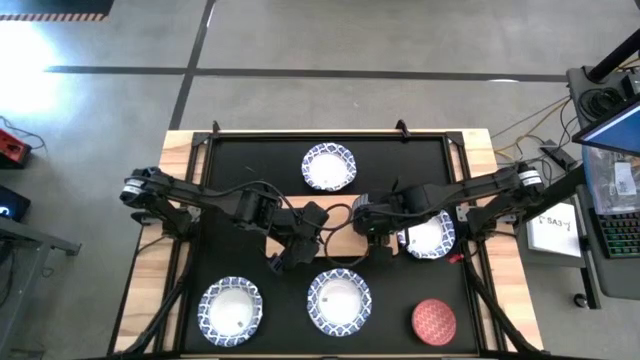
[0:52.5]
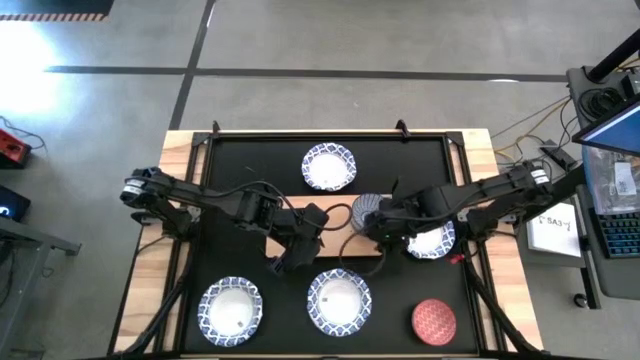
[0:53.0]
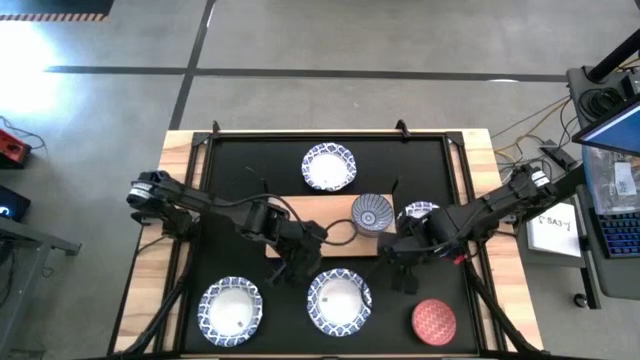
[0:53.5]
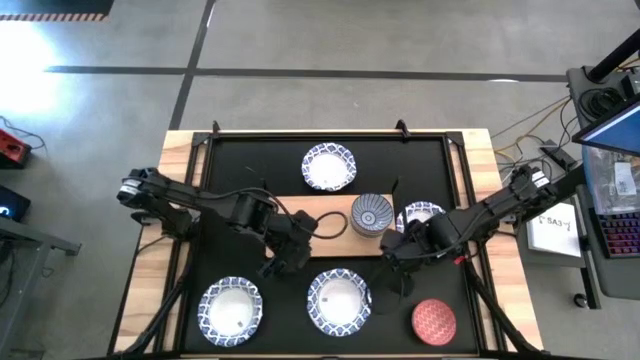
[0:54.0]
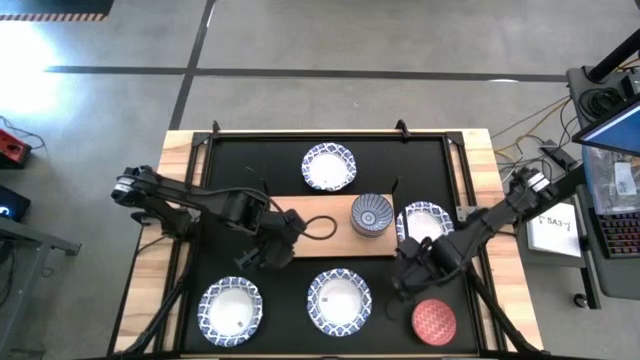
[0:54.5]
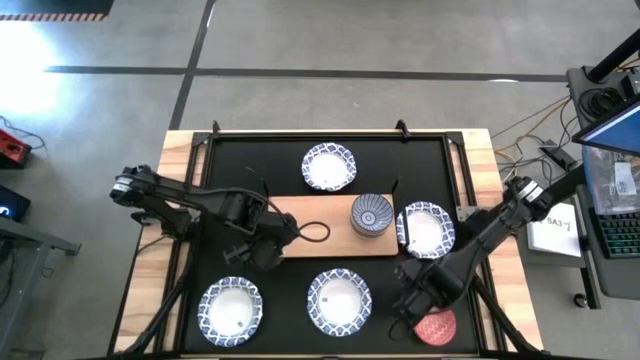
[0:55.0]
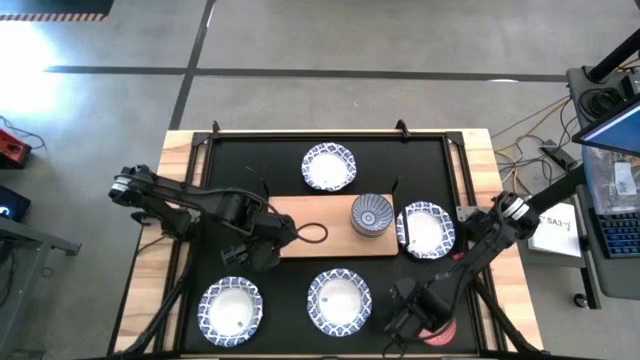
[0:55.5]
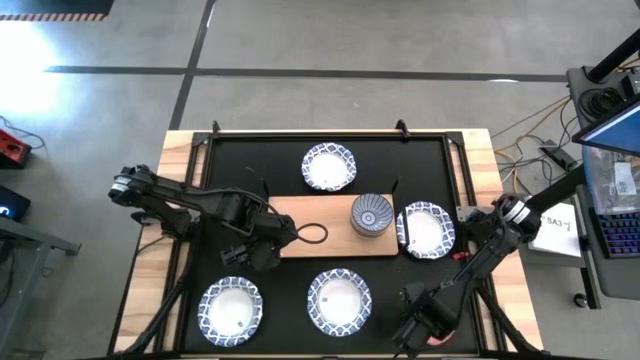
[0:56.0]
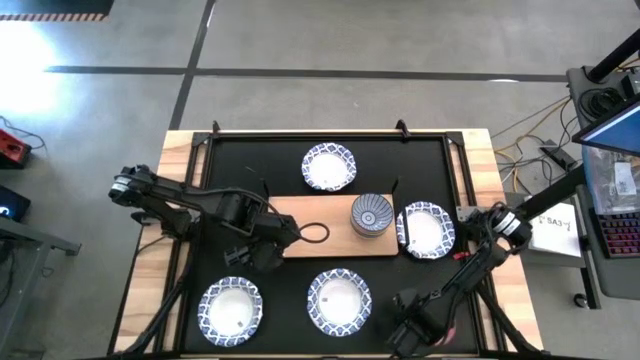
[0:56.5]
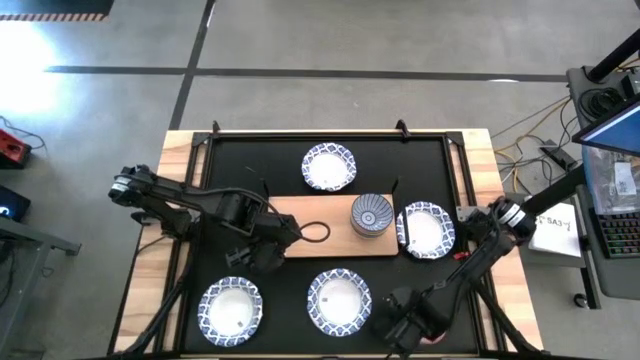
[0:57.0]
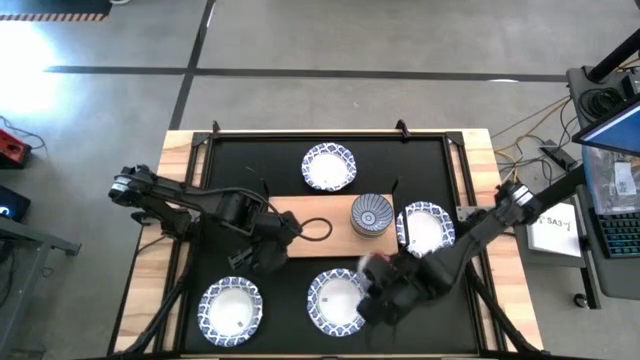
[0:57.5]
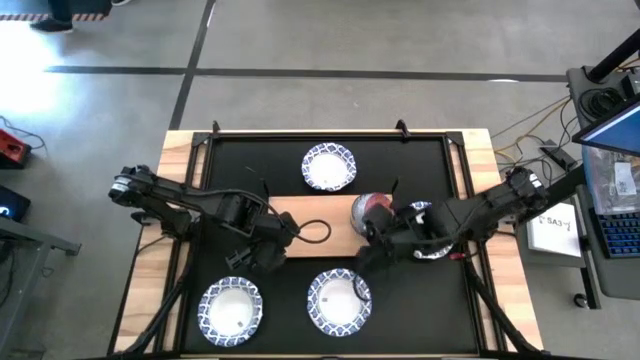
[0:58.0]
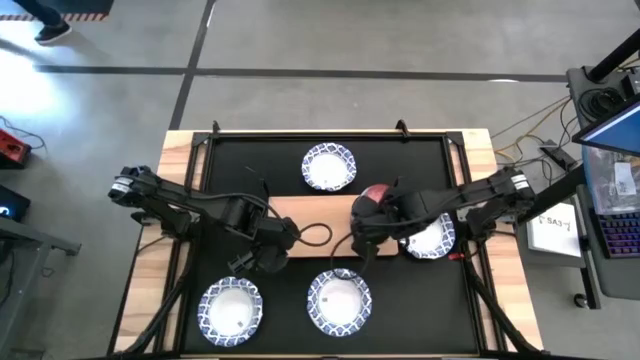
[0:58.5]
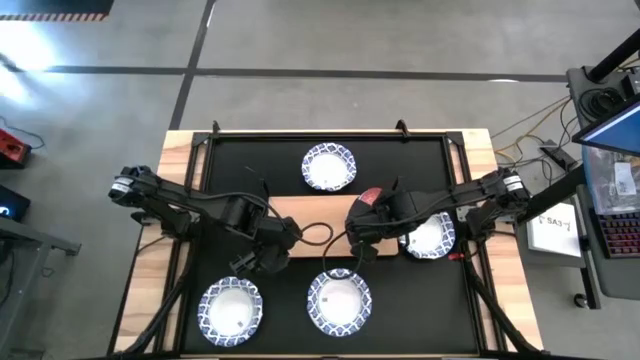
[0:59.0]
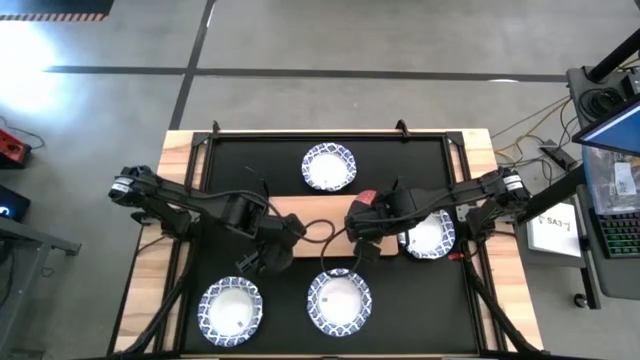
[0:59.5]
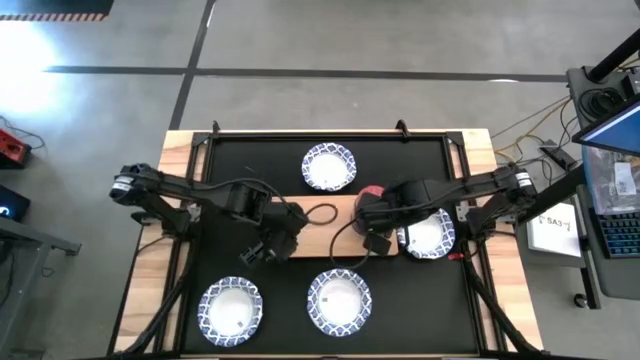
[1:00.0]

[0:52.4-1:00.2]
Task: Place and stack bowls onto a shelf
Stack the small orange and gray patterned bowl on top of the small dark blue and red patterned bowl

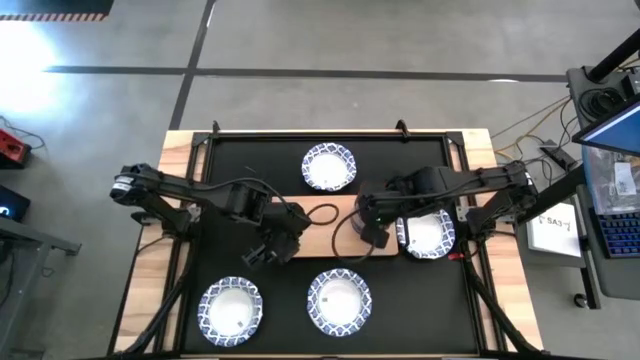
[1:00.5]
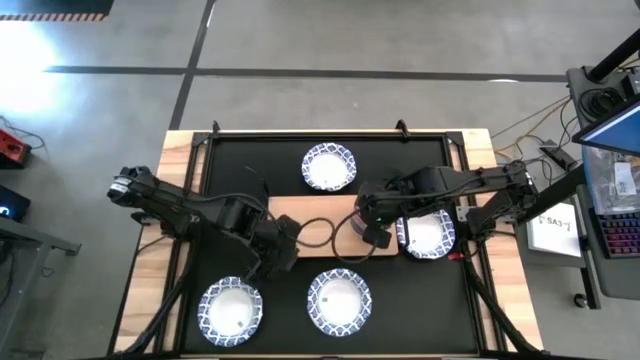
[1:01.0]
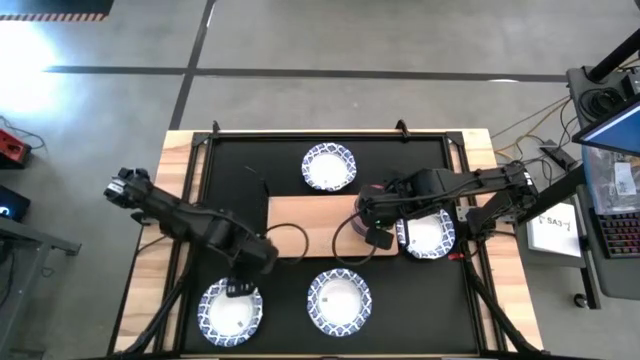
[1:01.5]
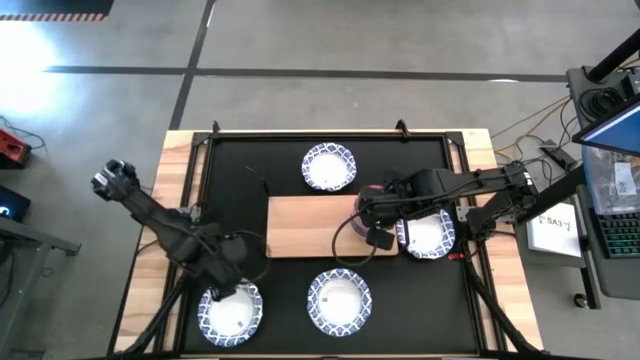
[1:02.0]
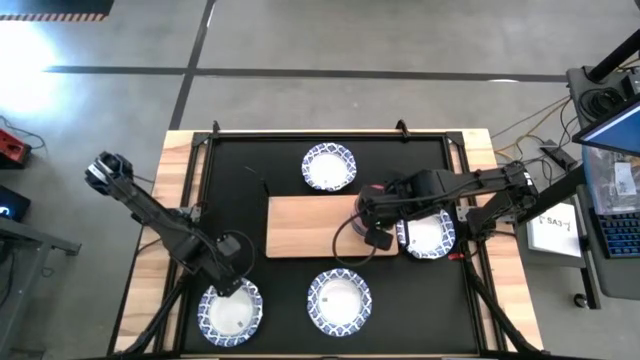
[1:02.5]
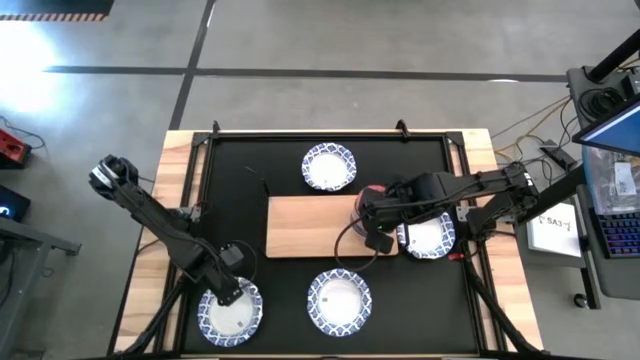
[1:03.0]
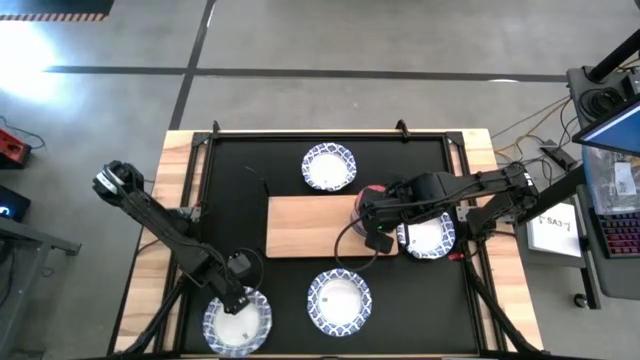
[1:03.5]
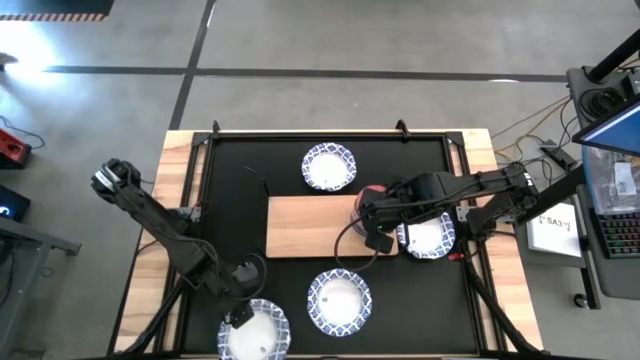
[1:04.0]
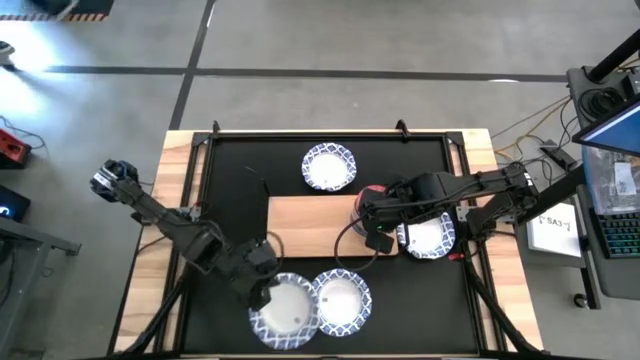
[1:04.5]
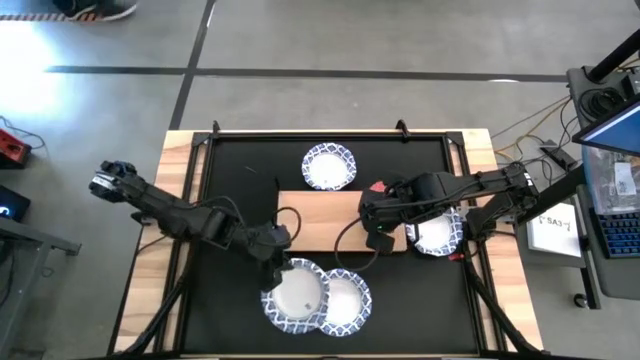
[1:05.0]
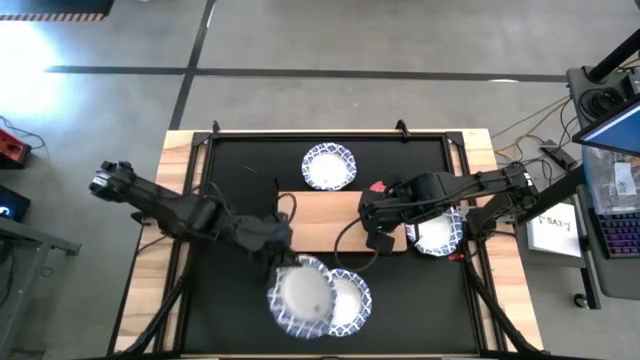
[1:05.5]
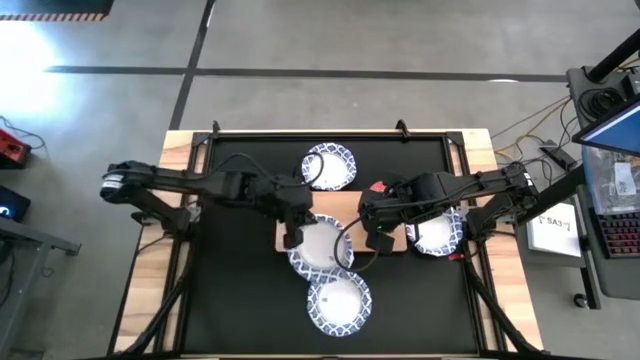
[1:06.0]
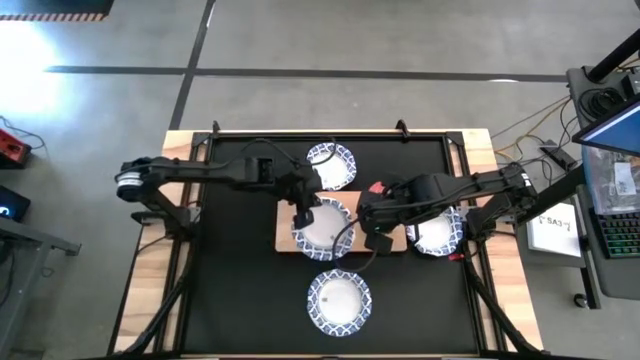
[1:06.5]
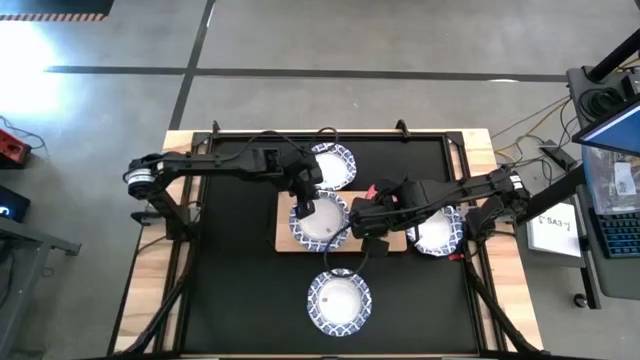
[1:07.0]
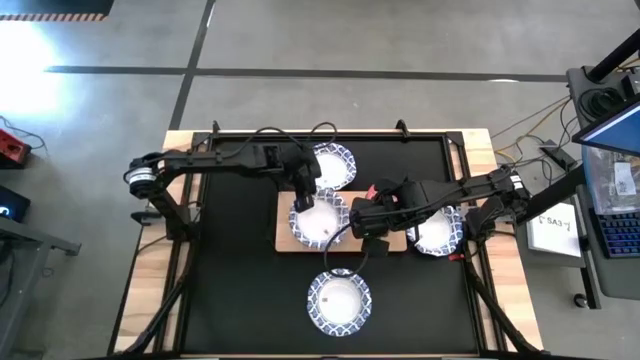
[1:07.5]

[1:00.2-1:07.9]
Put the big white and blue patterned bowl on the shelf

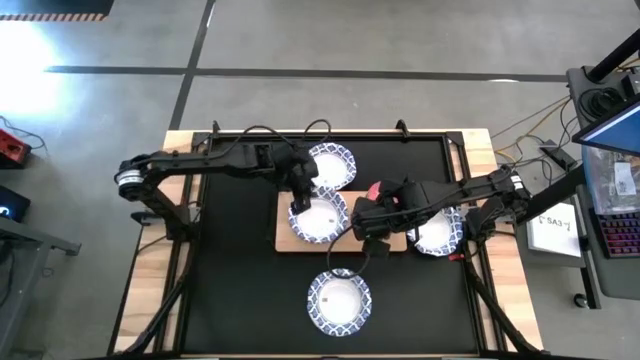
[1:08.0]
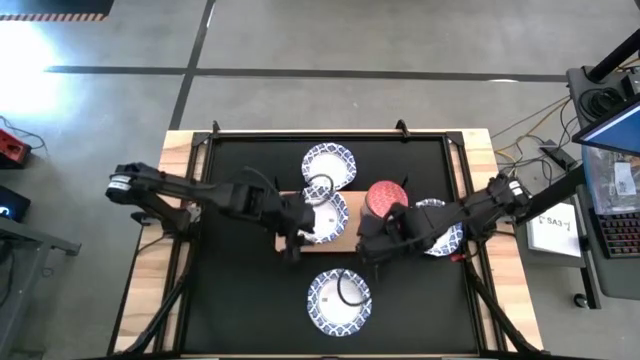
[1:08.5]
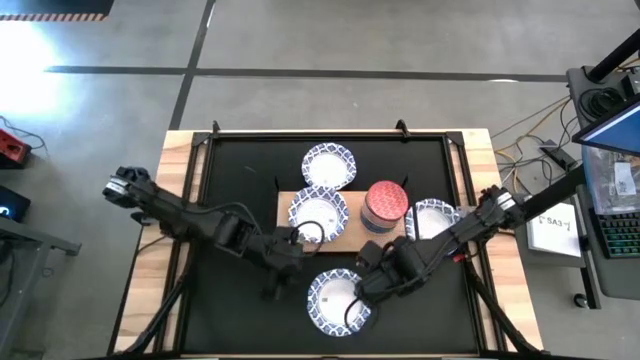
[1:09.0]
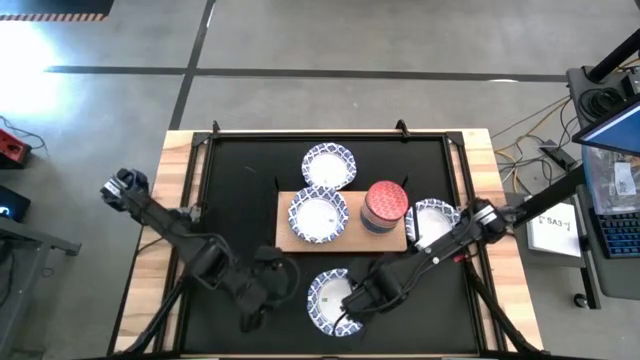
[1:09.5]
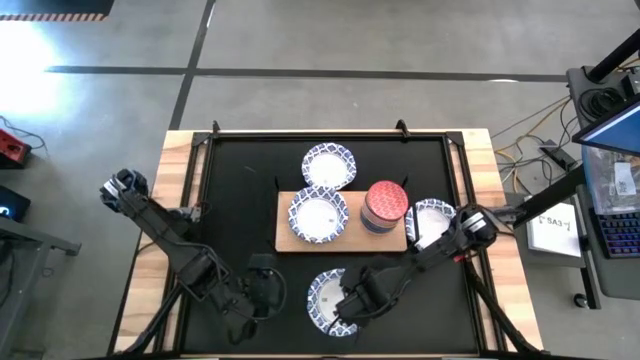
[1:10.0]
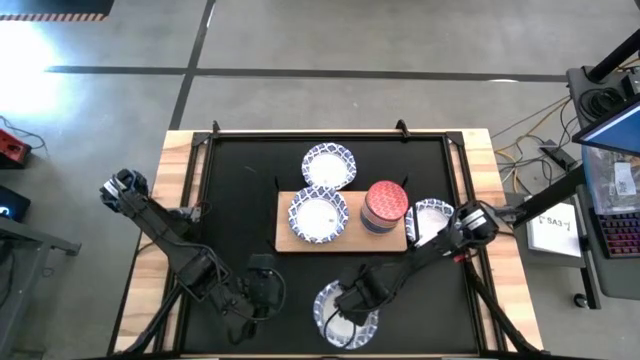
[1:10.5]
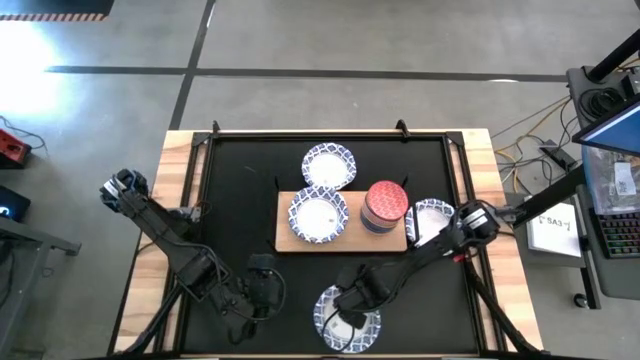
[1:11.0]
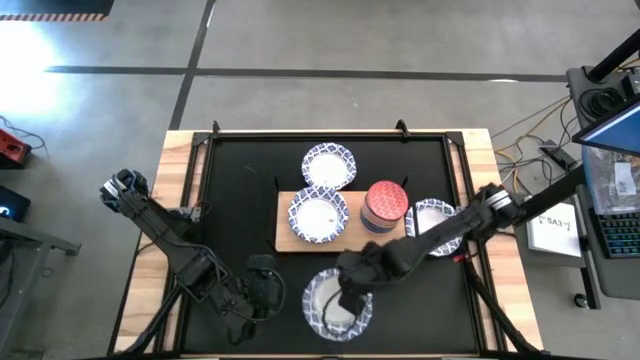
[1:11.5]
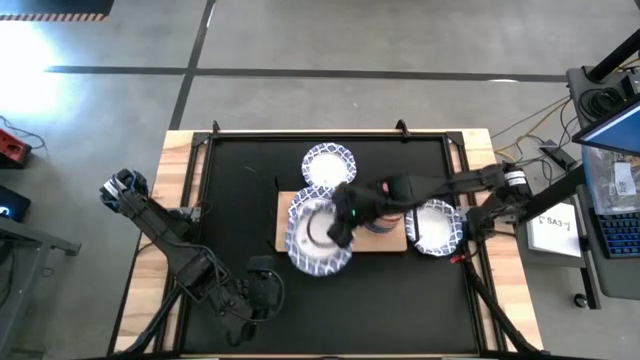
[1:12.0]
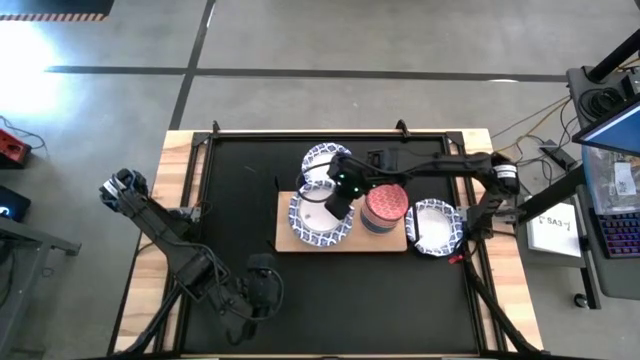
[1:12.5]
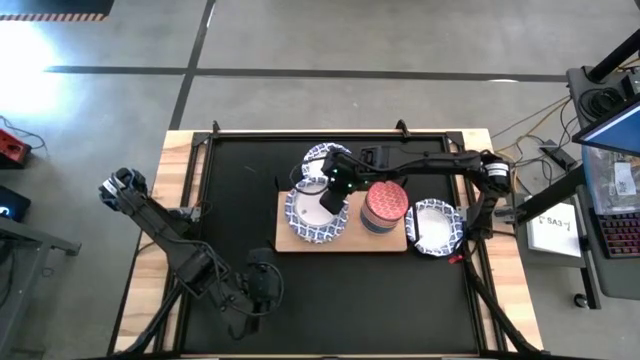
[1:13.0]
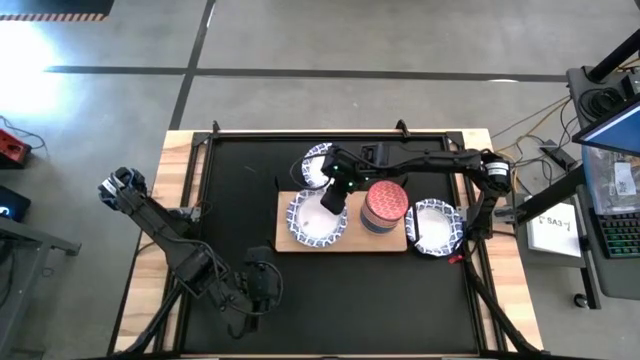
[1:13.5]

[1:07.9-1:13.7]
Stack the big white and blue patterned bowl on top of the big white and blue patterned bowl
